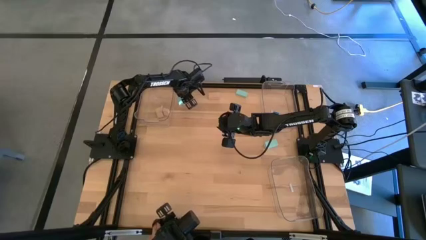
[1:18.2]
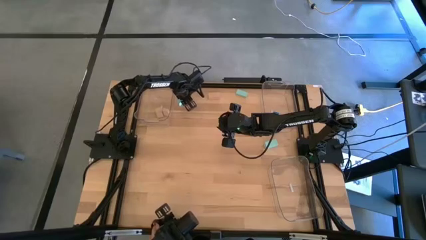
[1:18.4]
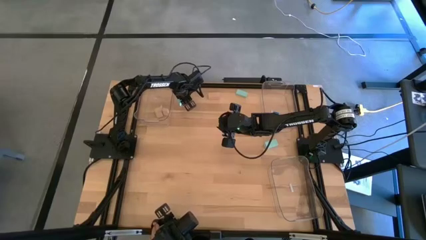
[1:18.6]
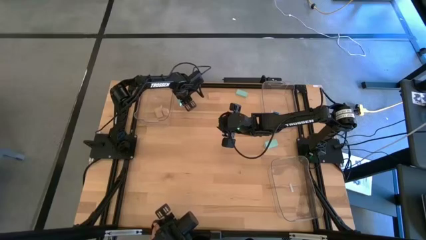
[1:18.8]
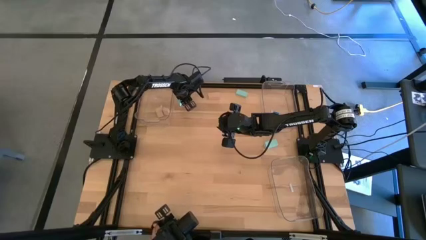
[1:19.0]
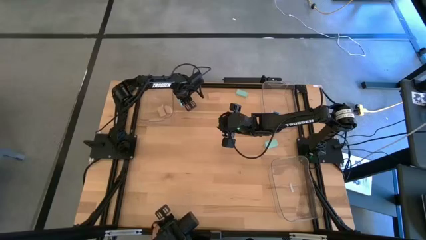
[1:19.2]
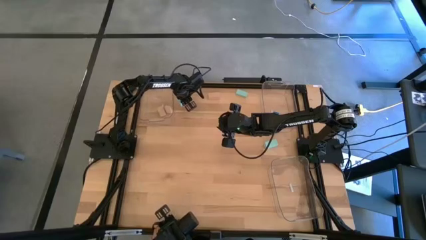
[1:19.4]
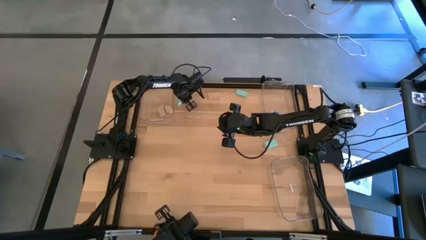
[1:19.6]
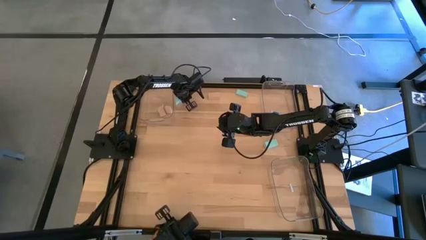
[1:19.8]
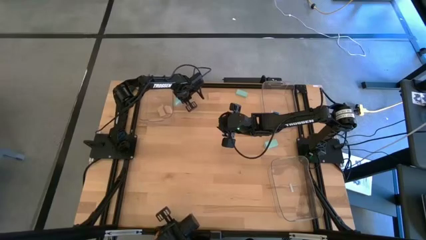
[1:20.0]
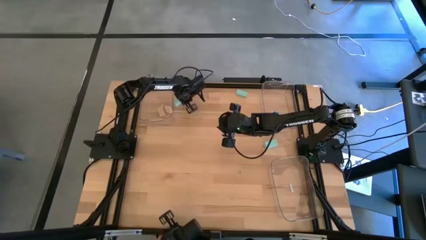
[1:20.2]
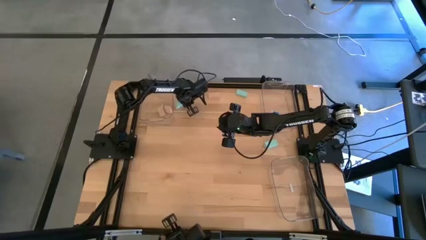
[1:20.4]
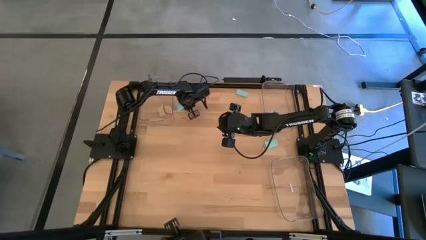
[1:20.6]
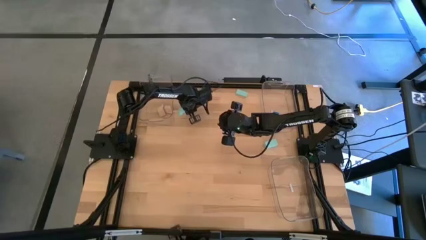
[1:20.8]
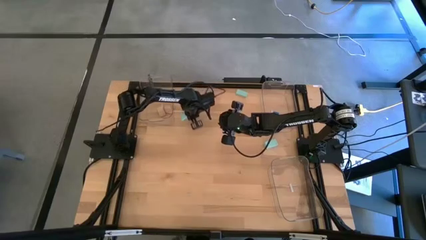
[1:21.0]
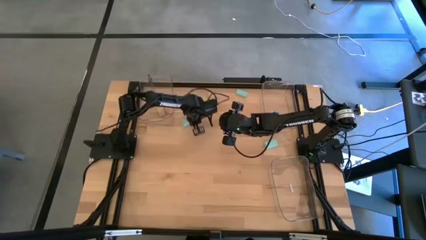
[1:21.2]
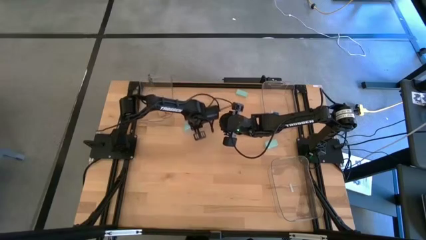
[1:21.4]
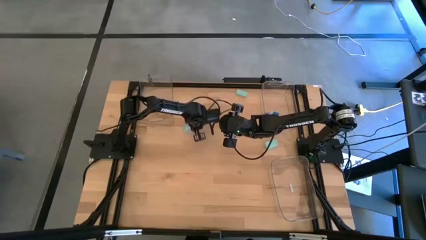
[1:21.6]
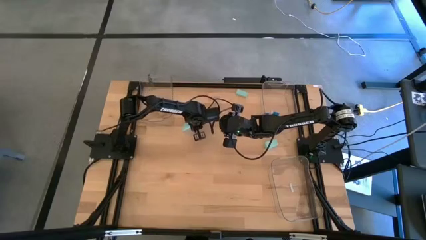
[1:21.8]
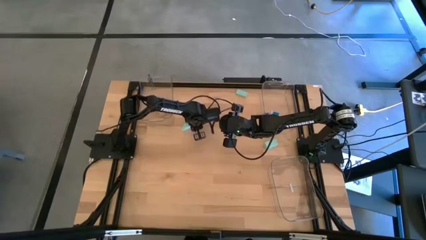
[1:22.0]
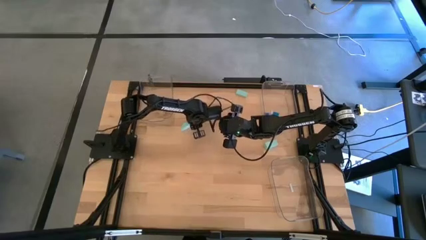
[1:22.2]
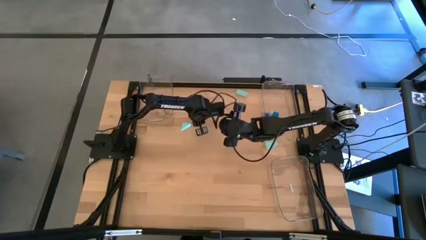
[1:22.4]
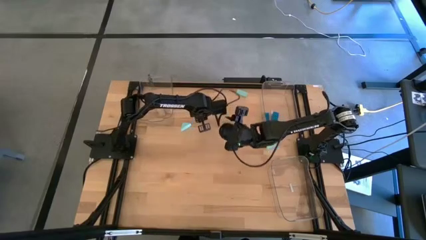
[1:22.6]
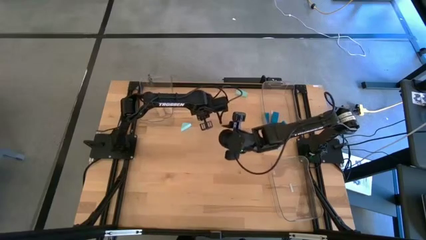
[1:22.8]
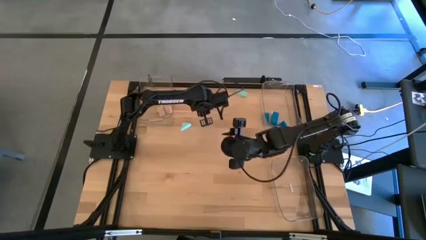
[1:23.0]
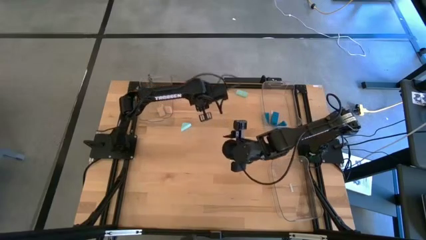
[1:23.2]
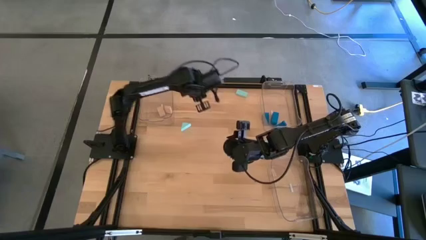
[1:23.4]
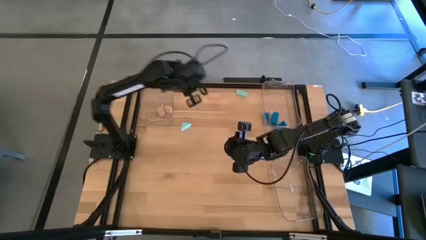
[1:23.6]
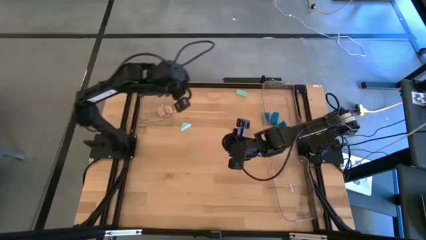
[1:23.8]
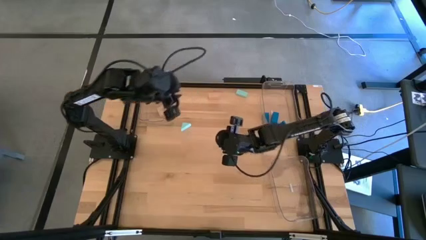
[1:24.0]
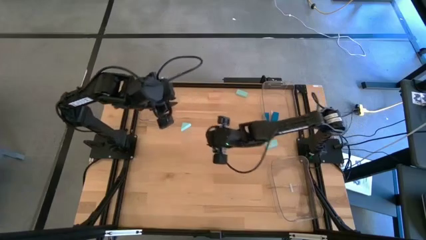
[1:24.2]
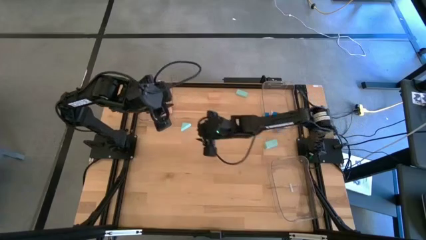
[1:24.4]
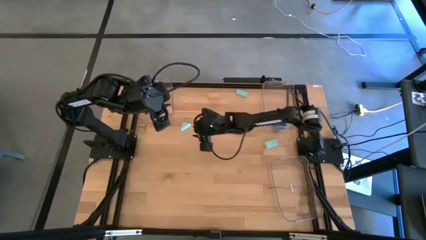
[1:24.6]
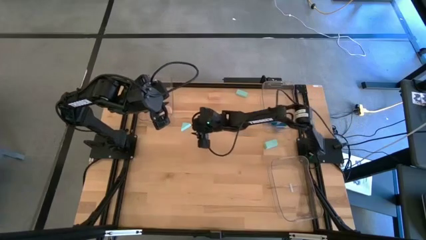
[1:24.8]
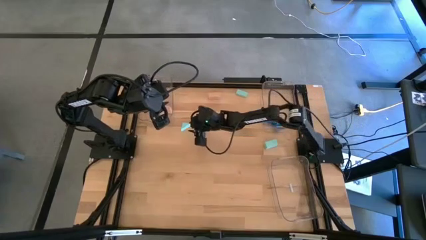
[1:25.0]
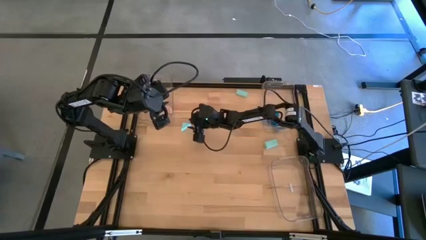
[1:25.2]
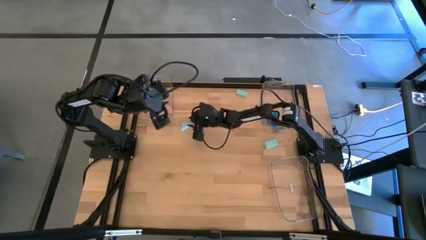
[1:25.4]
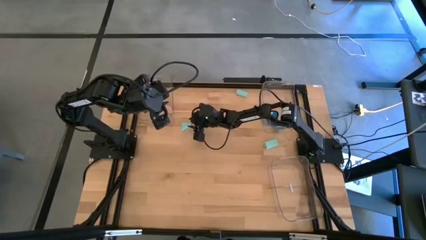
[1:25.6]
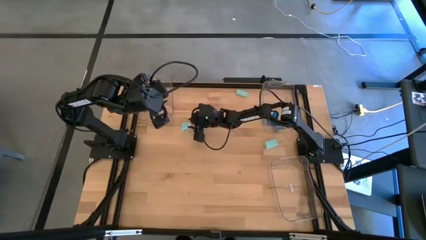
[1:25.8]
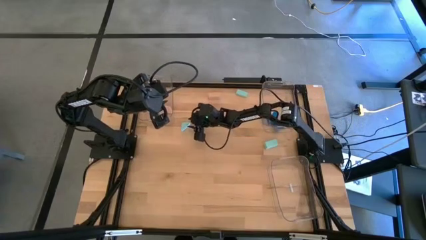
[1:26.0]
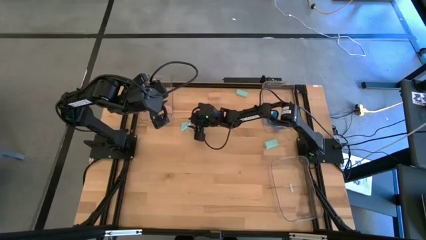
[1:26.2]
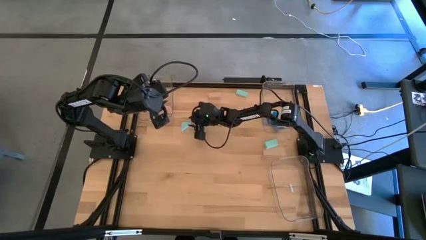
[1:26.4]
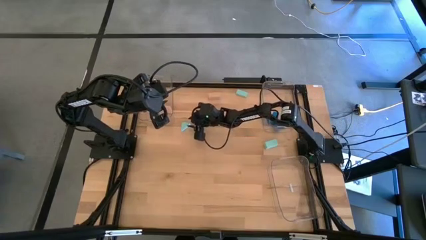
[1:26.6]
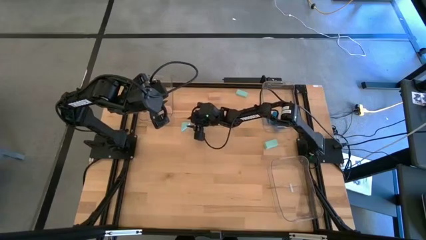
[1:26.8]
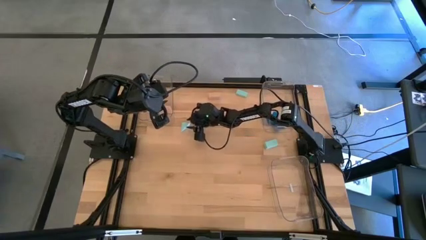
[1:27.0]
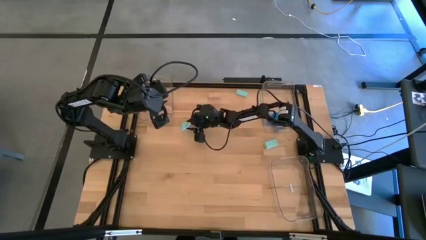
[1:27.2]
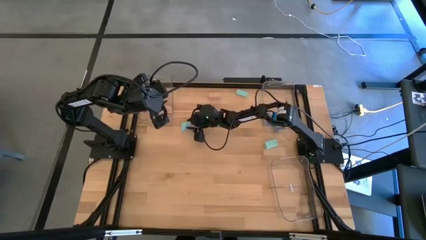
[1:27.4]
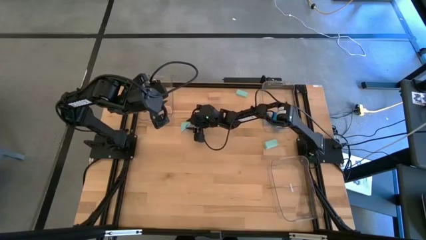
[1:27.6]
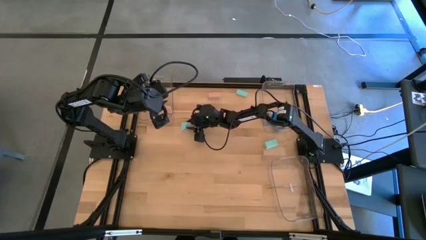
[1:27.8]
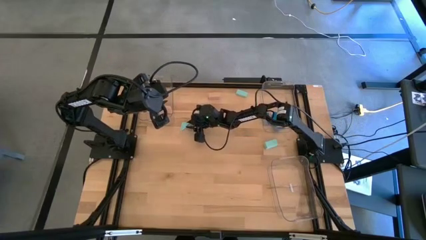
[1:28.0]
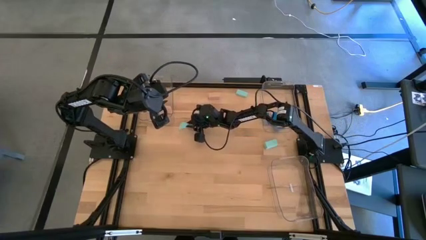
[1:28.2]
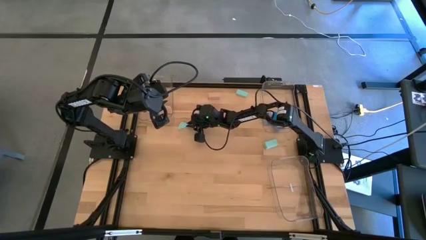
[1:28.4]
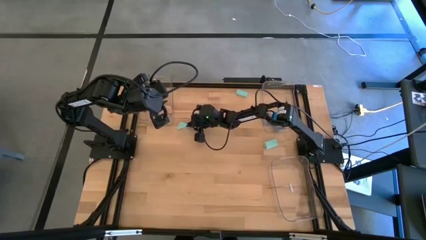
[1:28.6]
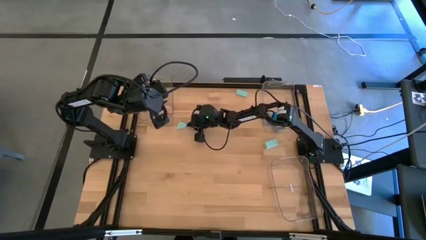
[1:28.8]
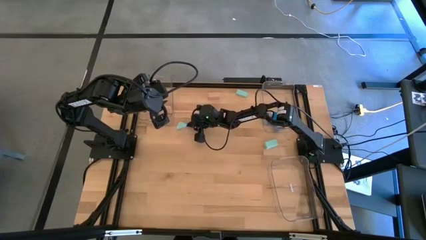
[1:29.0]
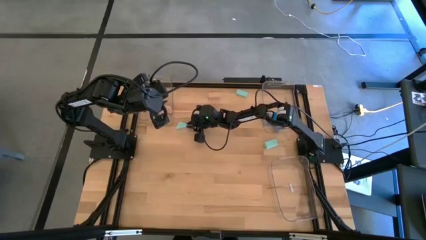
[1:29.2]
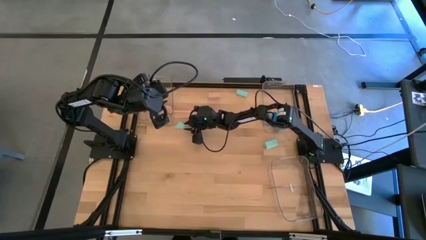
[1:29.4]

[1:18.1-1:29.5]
Task: Sort & place blocks by color
Put the top left light blue block into the bottom right transparent bin

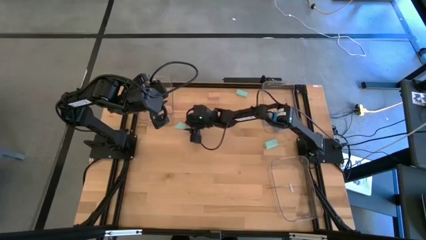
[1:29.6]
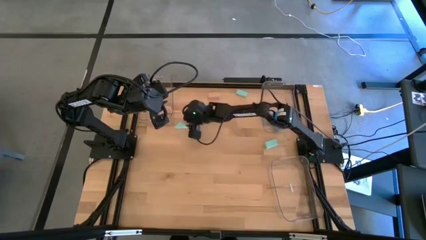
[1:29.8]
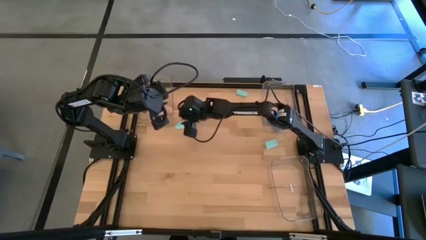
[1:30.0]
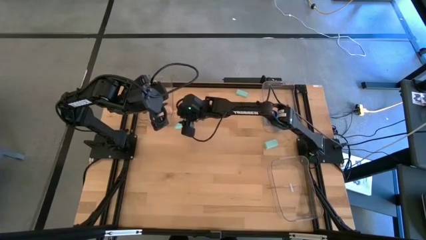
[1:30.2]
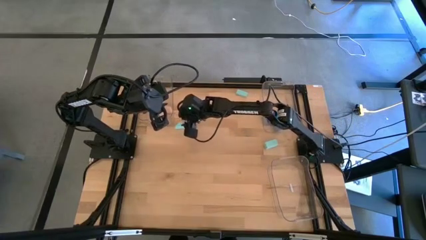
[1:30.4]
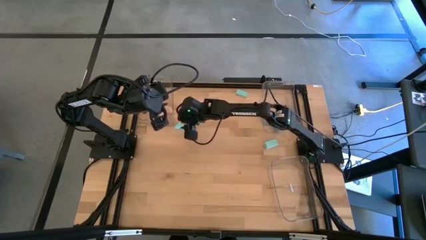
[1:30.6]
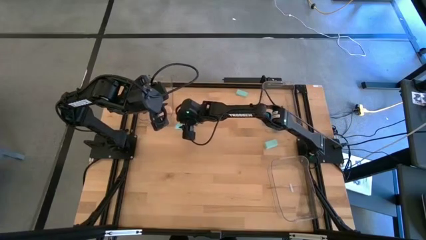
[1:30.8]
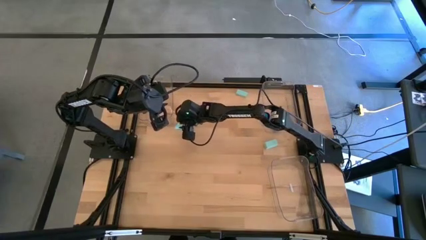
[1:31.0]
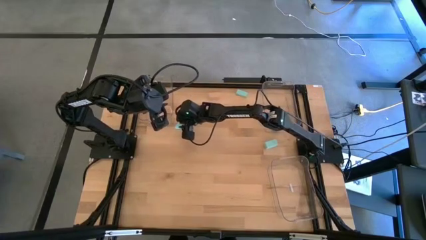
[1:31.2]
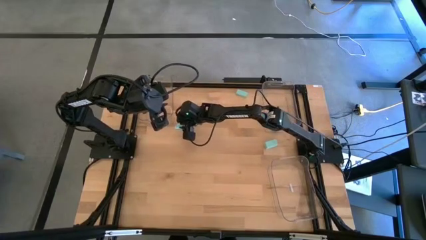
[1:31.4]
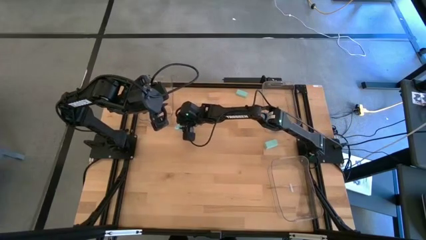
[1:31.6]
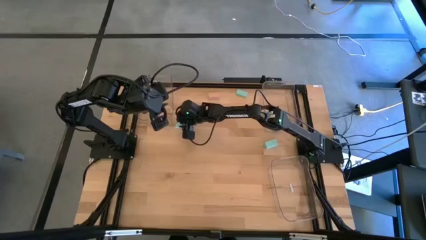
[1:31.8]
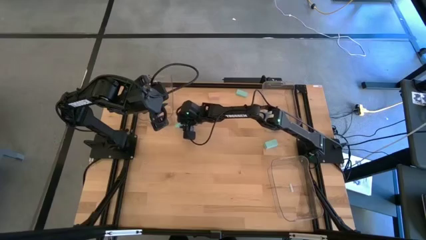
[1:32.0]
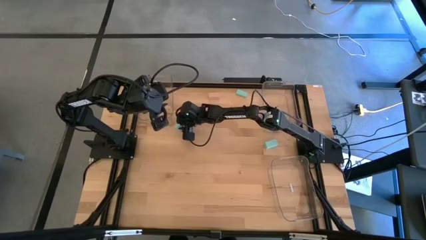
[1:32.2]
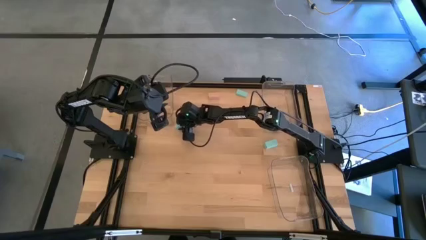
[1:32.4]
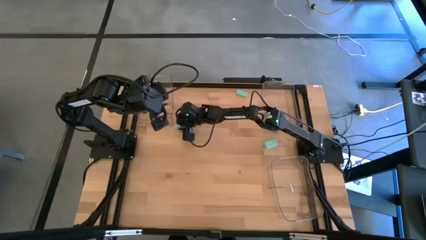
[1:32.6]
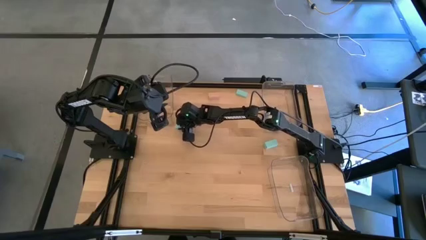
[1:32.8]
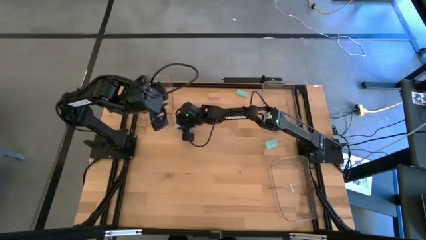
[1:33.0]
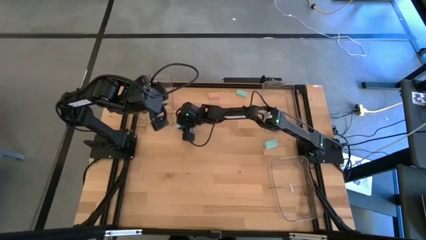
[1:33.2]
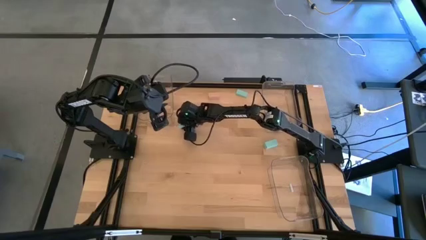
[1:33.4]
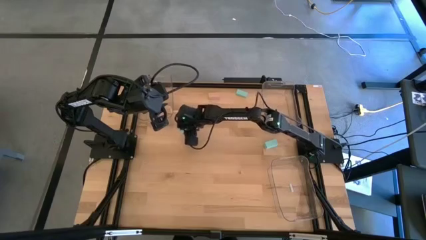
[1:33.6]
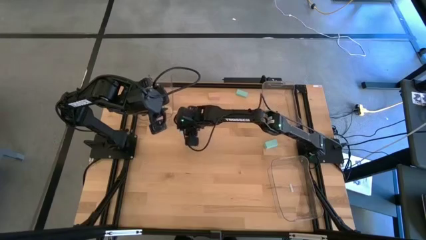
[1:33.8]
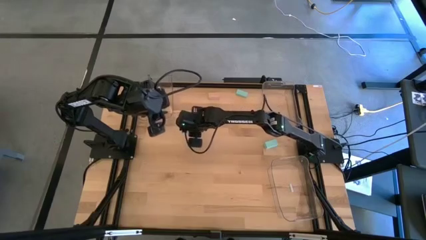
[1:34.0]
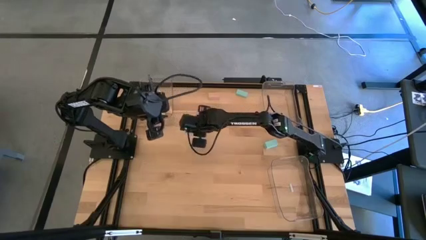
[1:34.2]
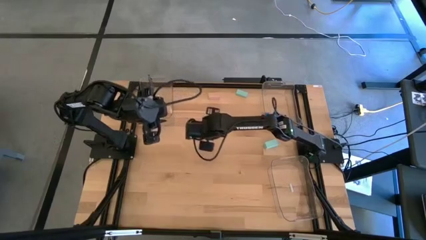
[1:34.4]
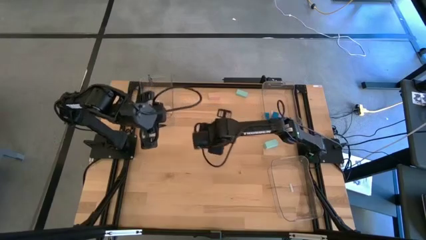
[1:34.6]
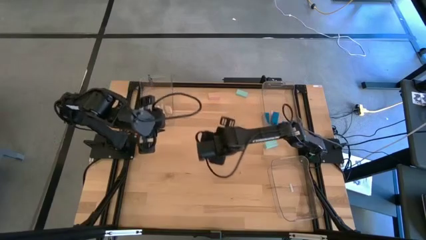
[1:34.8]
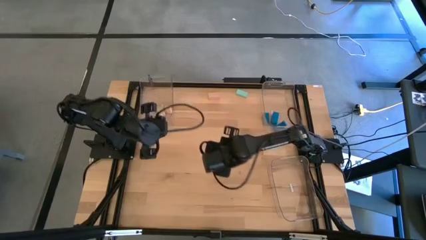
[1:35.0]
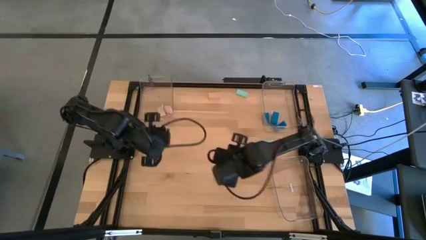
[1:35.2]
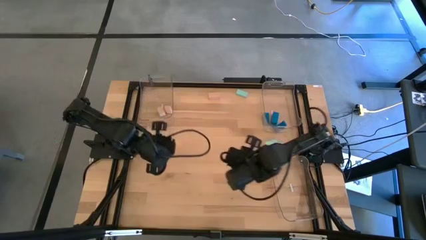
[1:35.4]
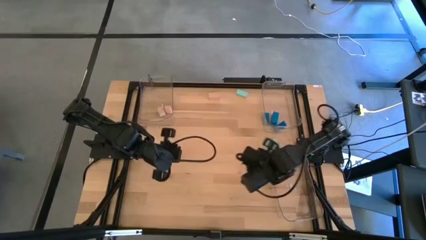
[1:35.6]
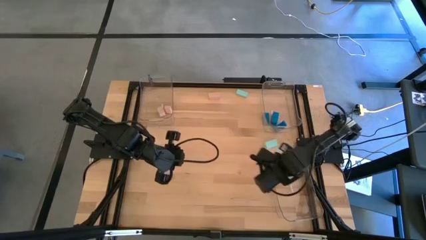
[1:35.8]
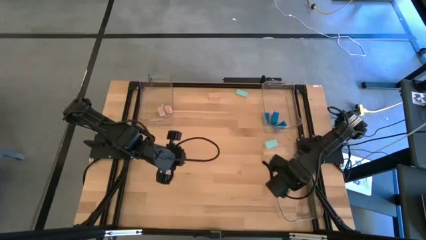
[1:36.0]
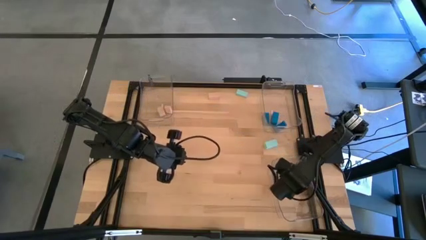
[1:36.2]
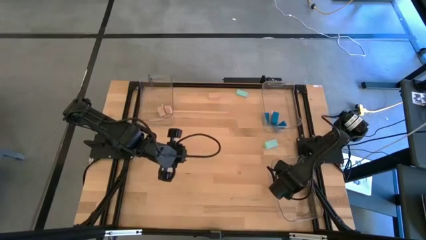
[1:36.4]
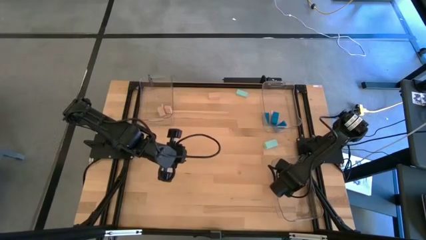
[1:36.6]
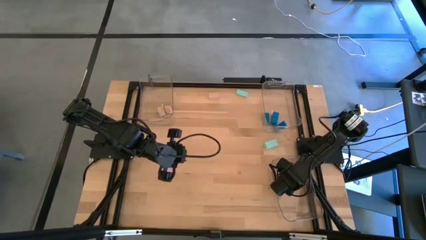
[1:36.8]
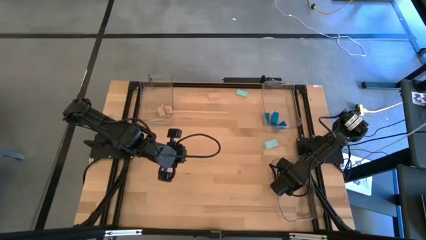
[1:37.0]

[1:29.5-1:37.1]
Put the top left light blue block into the bottom right transparent bin
